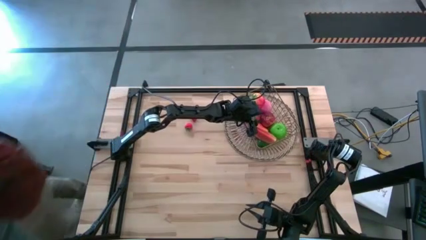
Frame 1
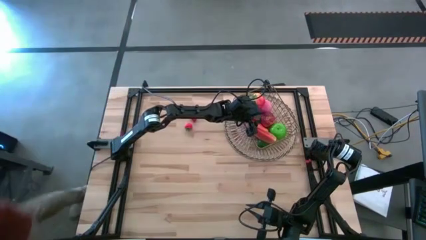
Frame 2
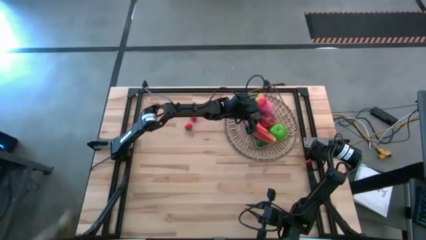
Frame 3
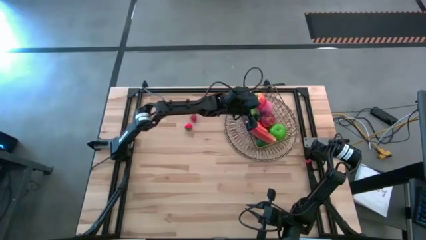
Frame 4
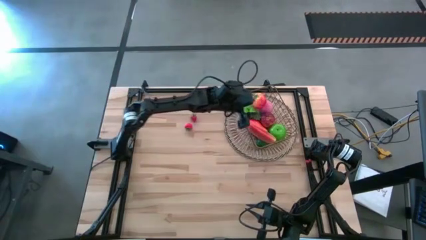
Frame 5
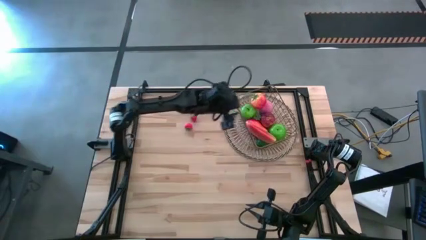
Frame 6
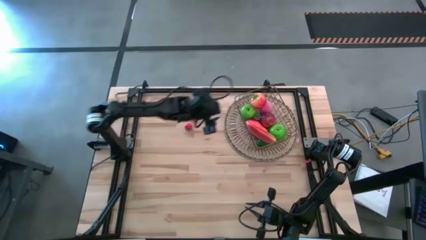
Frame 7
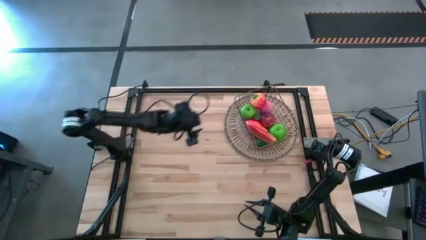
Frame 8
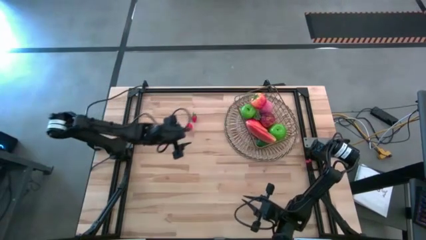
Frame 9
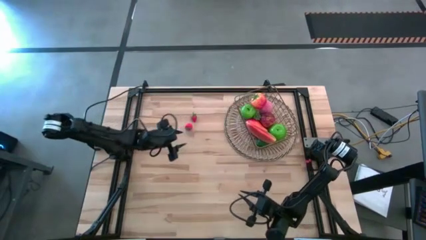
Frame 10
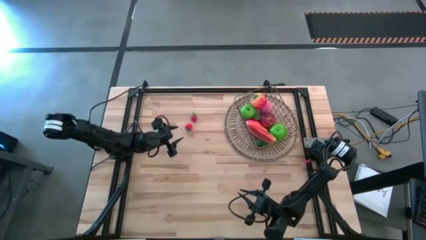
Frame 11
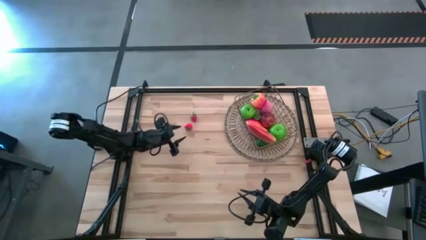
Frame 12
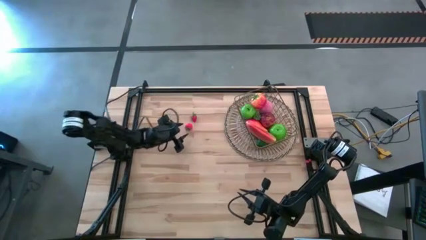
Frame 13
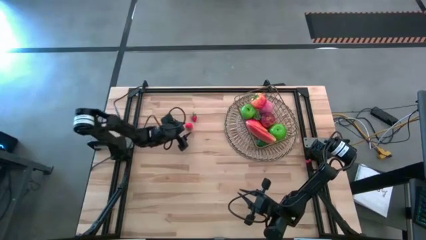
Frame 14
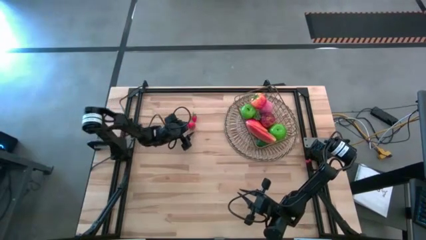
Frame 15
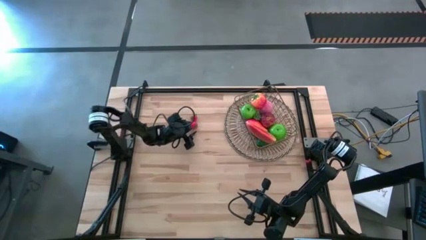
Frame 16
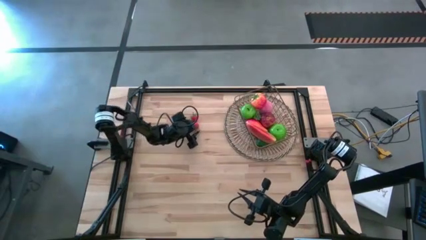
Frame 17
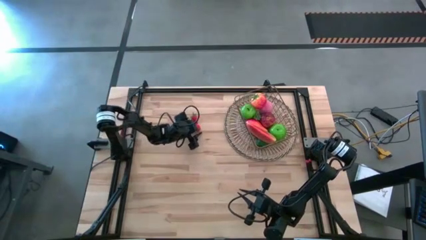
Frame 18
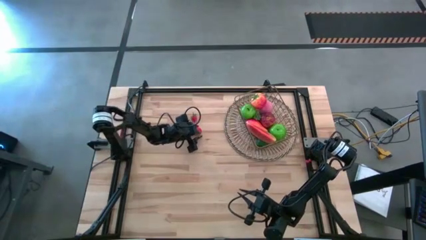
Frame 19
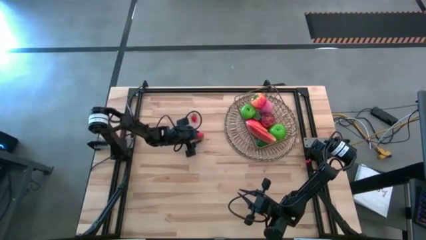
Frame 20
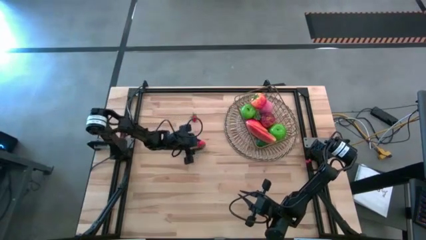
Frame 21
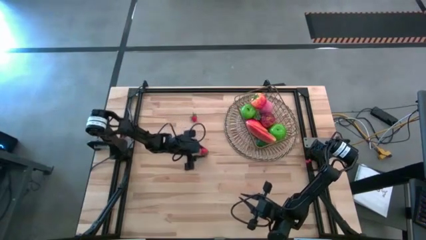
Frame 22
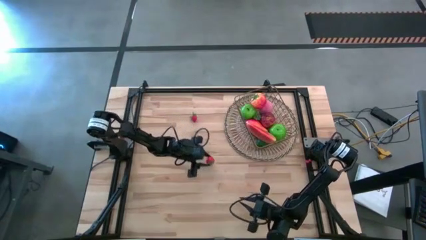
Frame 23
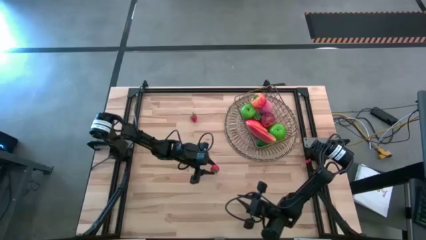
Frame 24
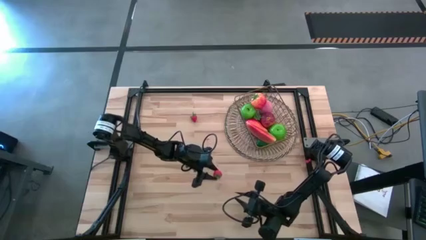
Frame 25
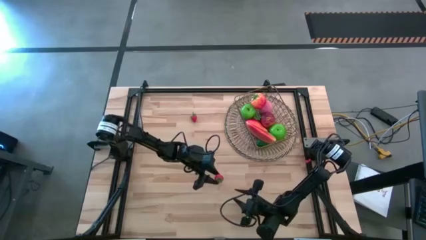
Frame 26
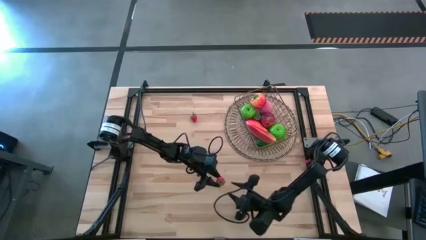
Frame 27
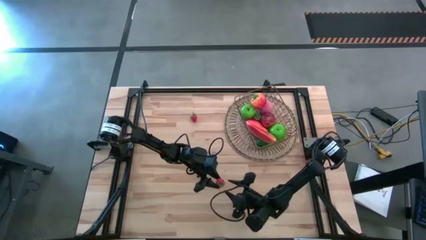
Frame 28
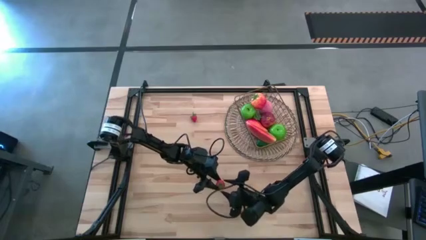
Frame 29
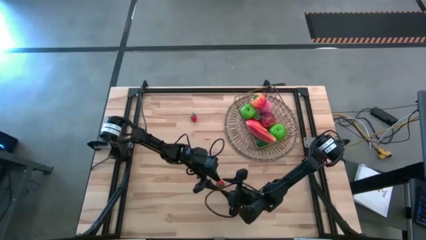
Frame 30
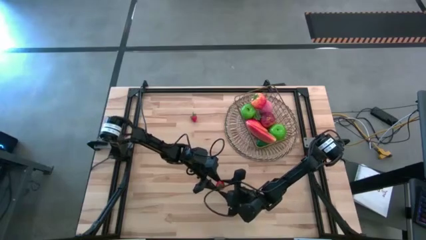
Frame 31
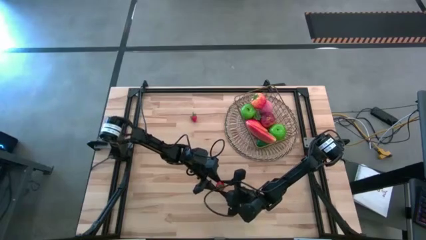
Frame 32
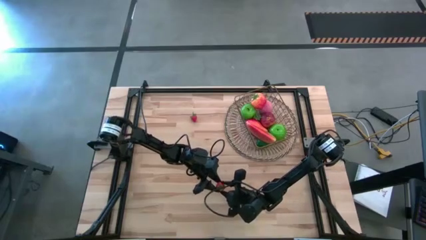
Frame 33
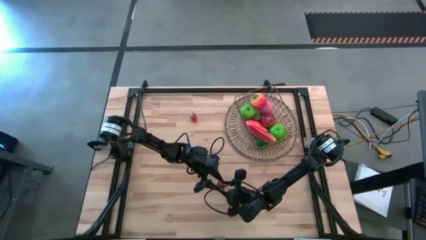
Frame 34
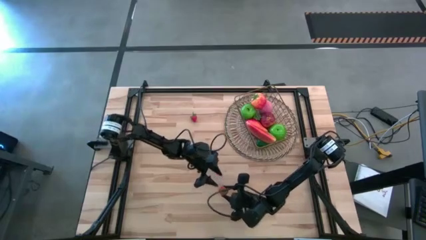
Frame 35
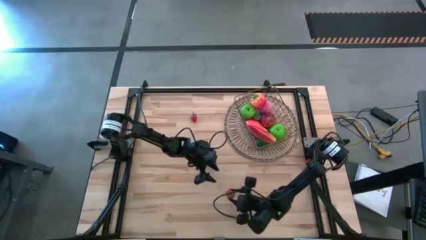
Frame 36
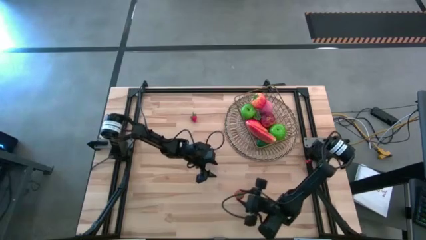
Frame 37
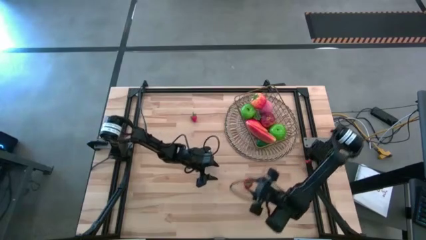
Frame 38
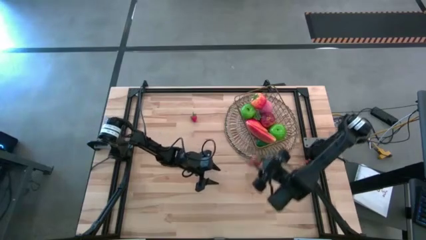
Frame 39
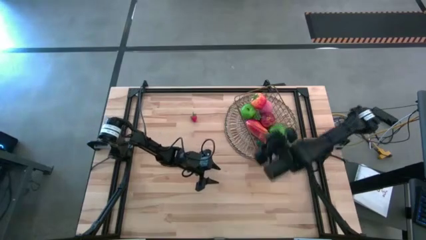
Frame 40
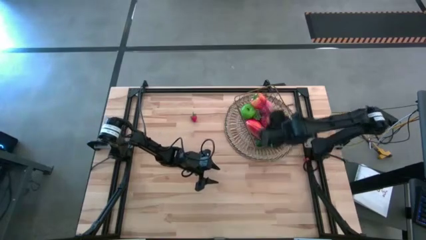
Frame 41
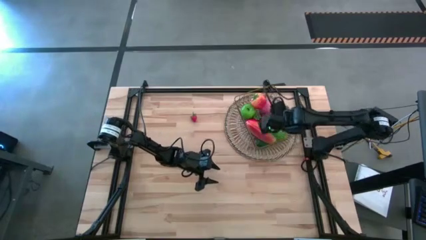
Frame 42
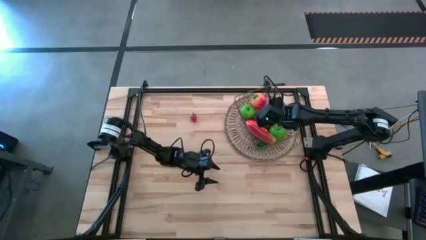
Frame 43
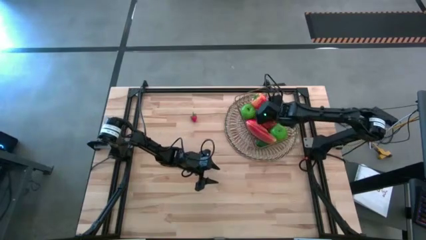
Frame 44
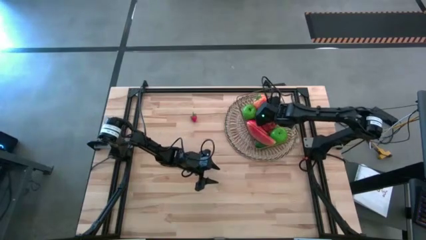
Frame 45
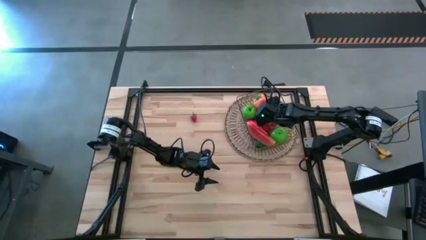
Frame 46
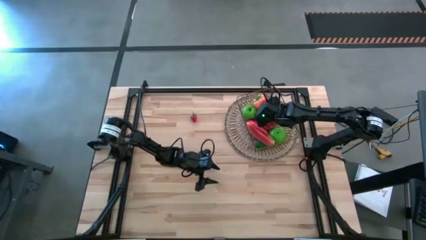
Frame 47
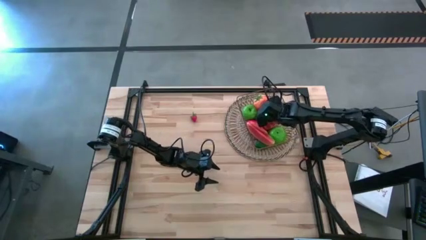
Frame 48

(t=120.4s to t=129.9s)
Task: Build produce basket
Put the bottom strawberry into the gold wire basket

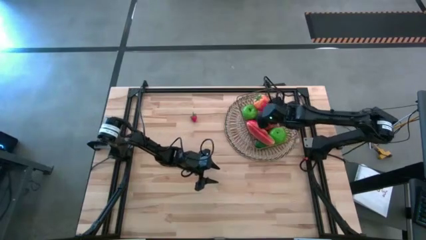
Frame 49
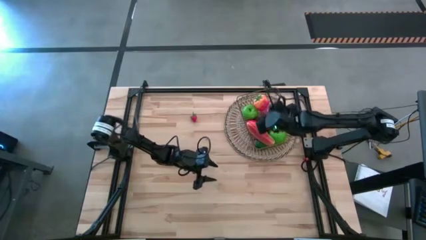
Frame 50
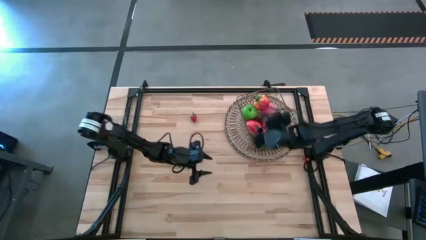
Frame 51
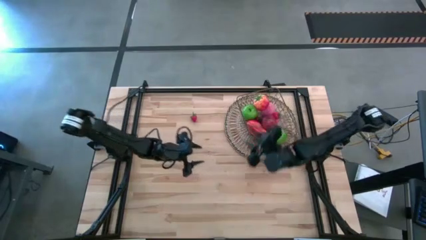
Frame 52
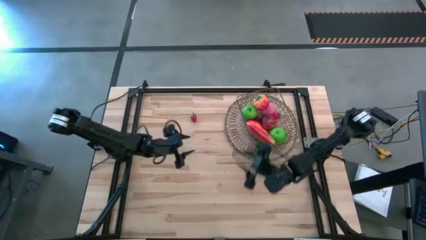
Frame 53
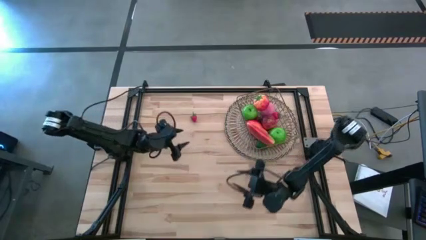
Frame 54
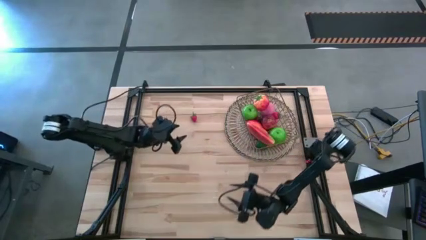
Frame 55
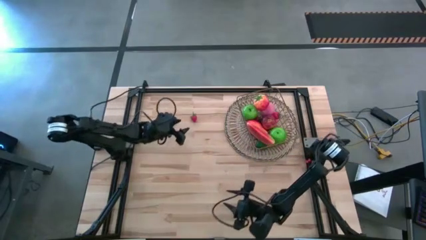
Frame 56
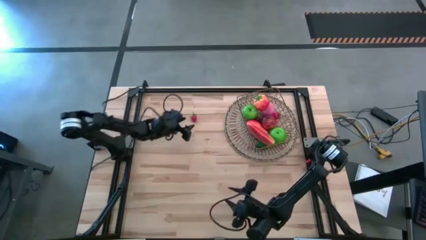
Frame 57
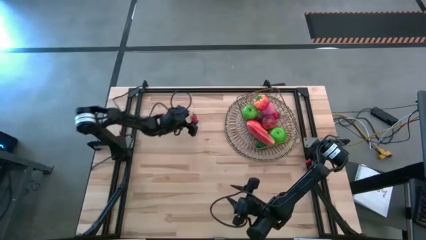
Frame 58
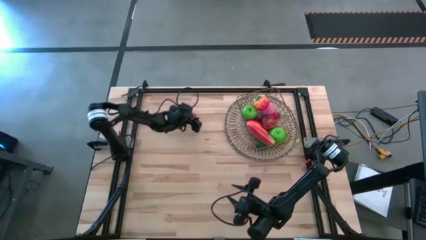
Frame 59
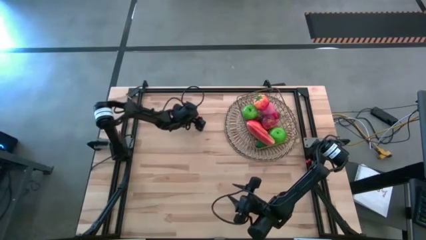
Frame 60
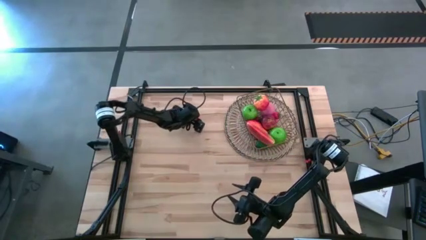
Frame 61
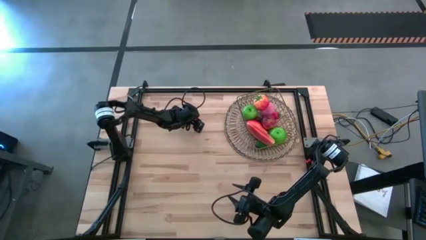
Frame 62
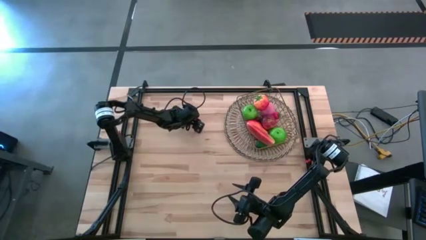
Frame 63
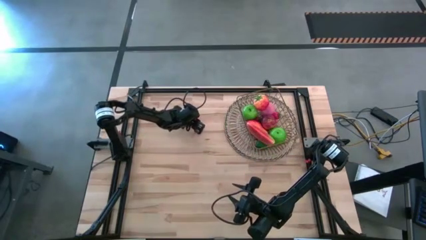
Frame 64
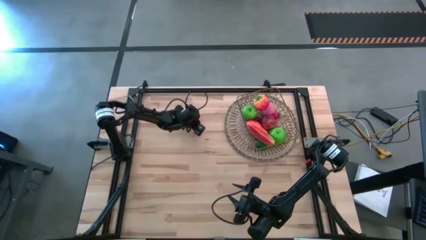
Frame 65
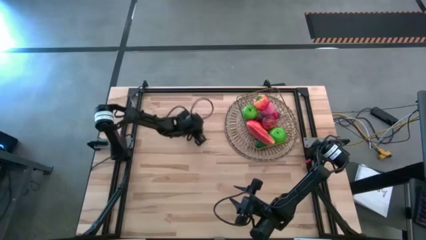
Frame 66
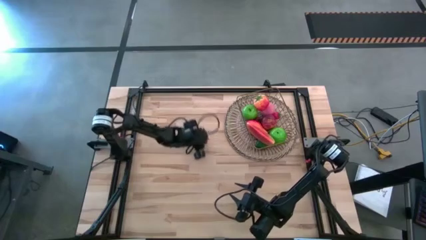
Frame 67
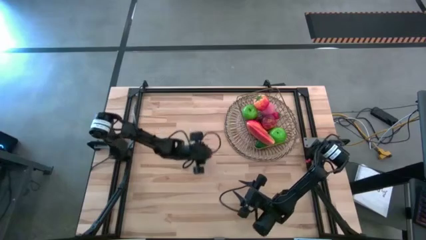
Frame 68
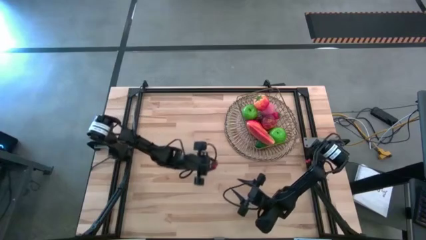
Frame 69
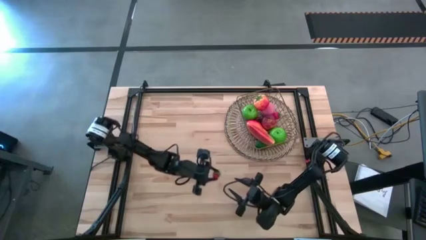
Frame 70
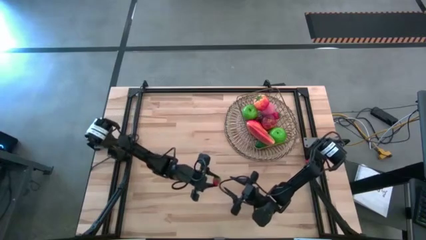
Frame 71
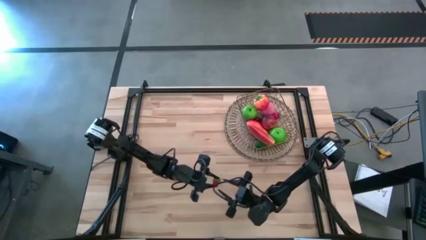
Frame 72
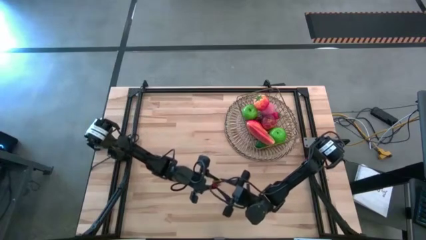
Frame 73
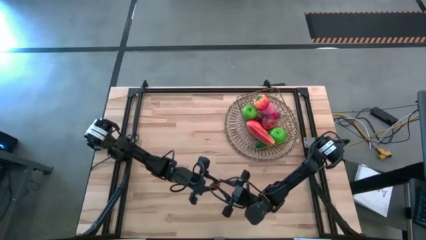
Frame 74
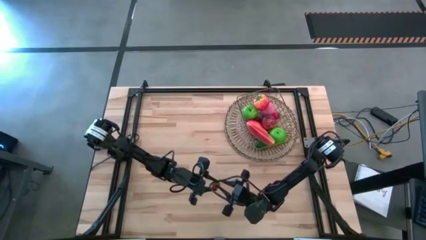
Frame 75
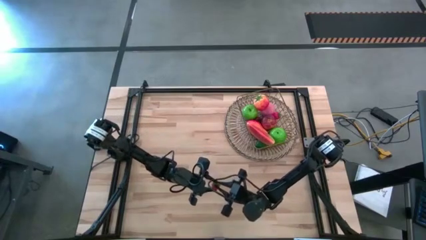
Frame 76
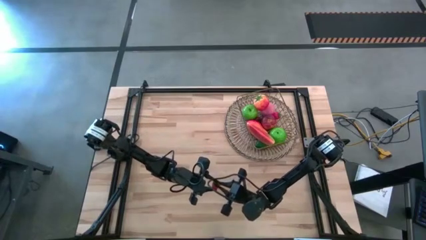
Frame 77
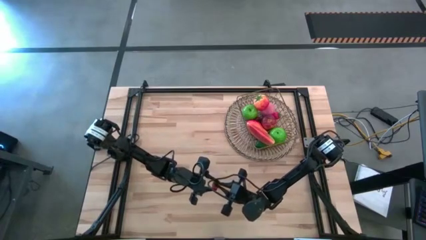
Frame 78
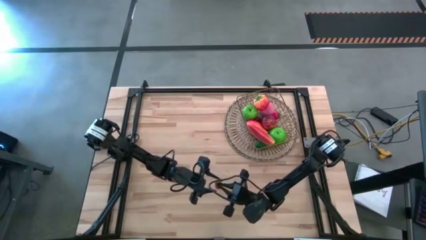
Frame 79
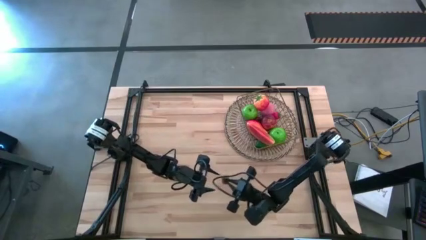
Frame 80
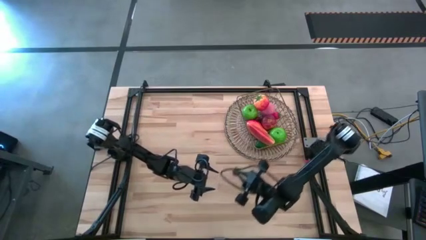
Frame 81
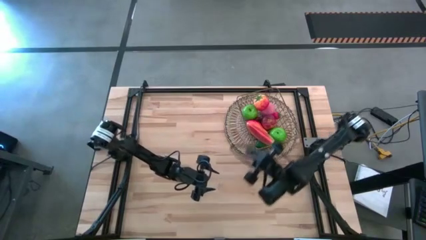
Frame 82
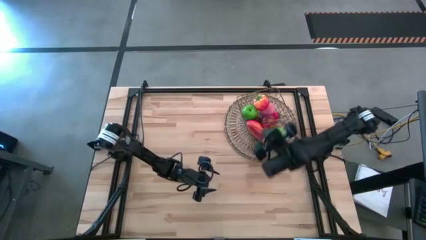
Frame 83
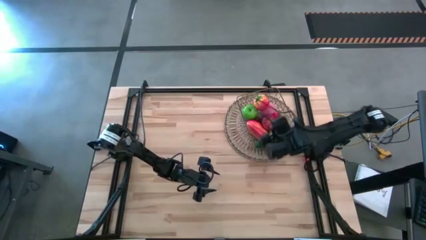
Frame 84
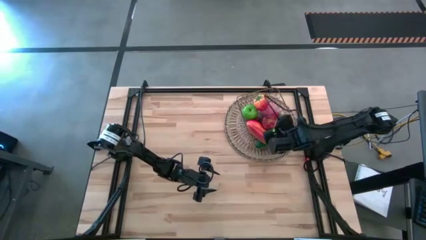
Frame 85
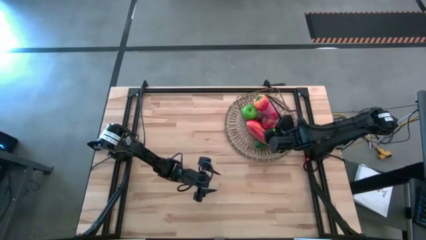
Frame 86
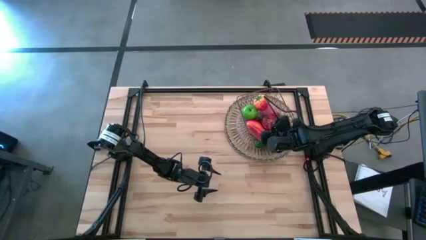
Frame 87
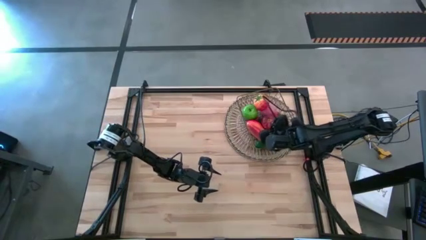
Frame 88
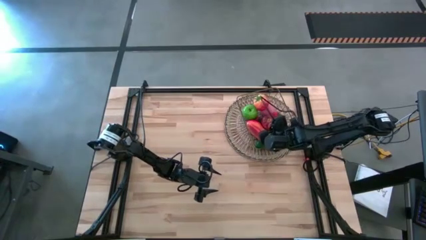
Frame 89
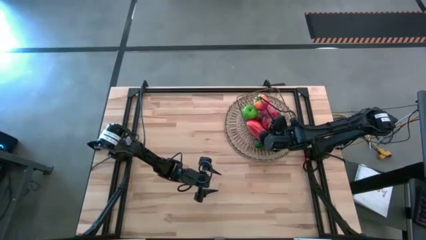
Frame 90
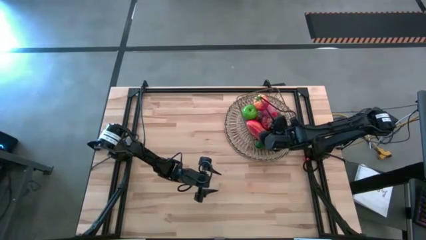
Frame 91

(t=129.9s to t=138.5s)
Put the strawberry into the gold wire basket
